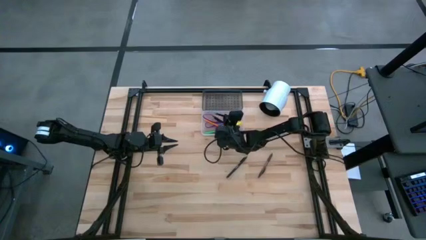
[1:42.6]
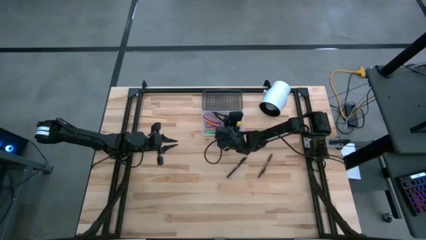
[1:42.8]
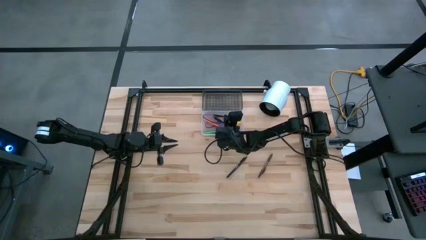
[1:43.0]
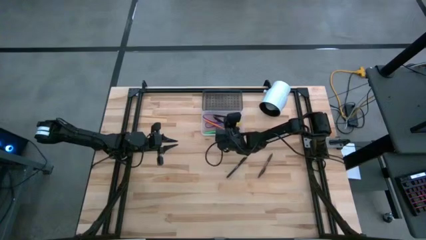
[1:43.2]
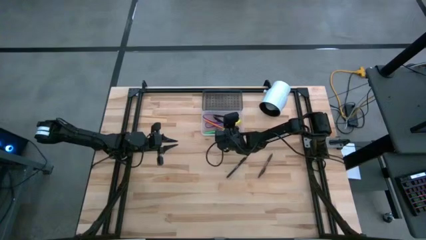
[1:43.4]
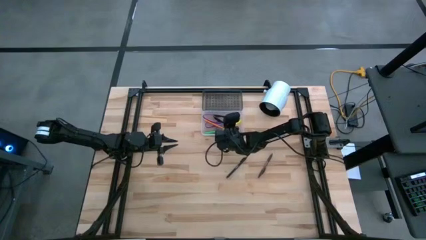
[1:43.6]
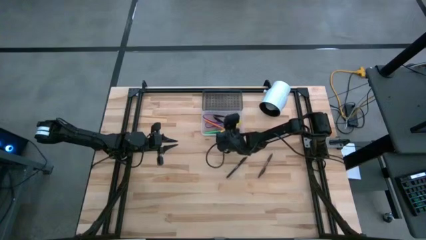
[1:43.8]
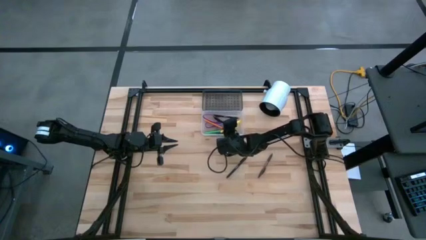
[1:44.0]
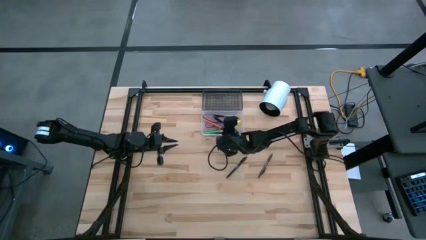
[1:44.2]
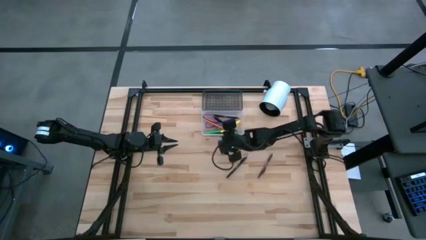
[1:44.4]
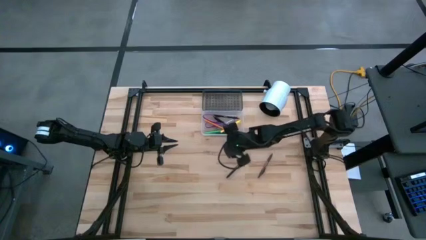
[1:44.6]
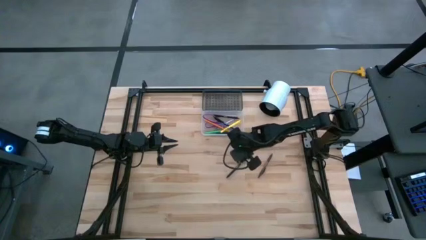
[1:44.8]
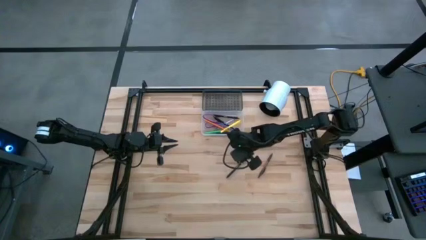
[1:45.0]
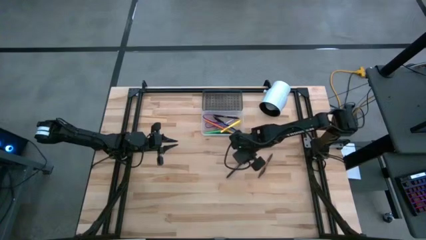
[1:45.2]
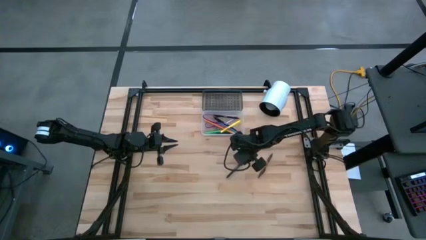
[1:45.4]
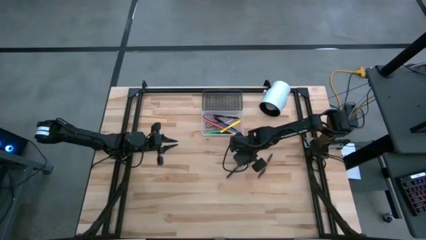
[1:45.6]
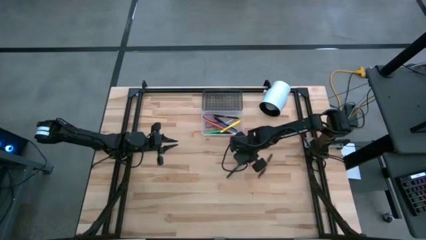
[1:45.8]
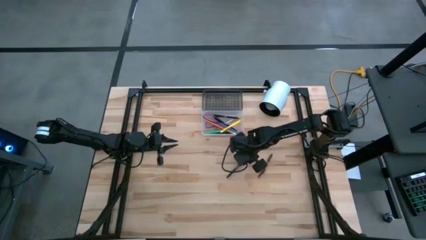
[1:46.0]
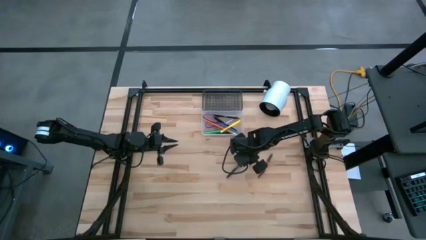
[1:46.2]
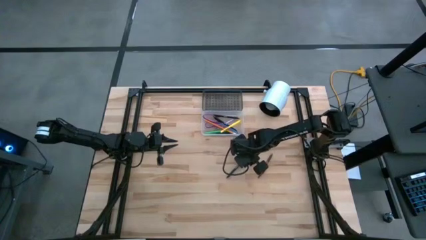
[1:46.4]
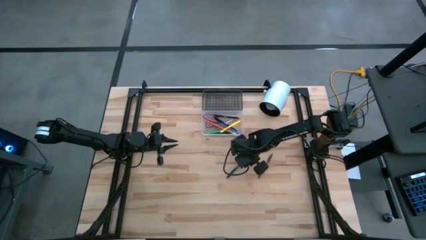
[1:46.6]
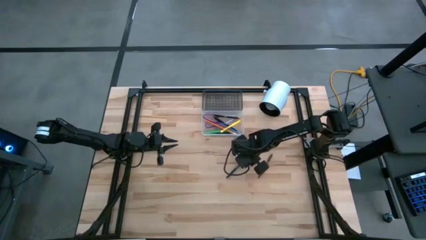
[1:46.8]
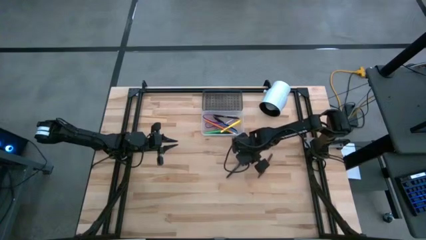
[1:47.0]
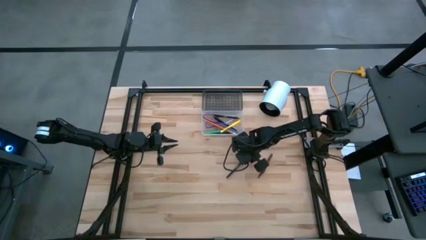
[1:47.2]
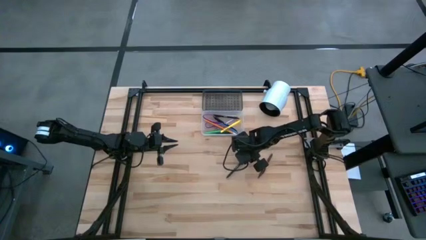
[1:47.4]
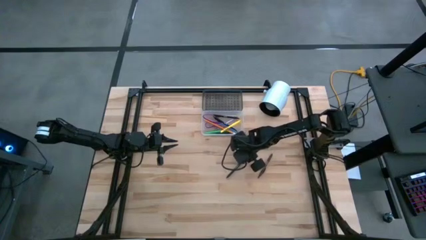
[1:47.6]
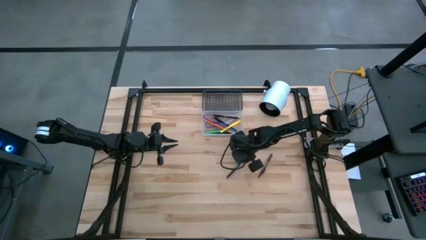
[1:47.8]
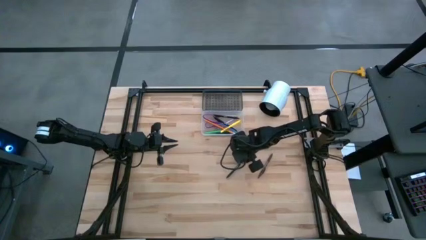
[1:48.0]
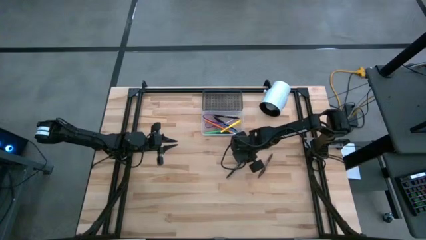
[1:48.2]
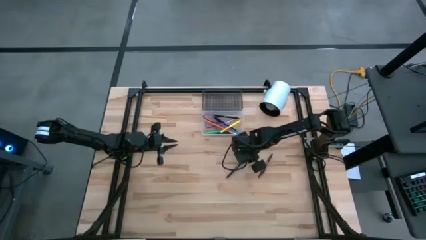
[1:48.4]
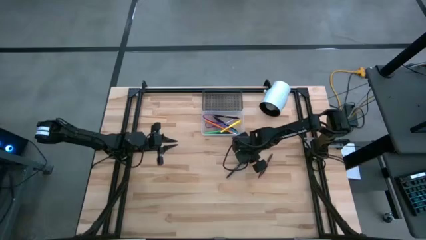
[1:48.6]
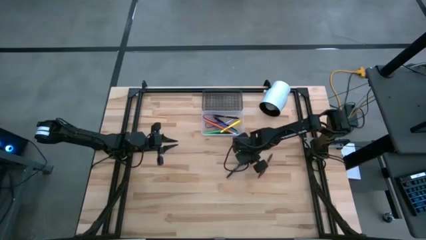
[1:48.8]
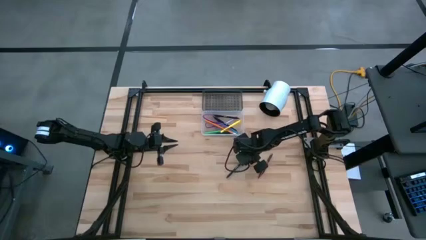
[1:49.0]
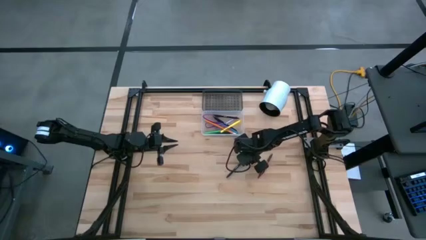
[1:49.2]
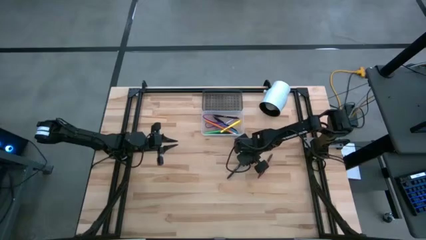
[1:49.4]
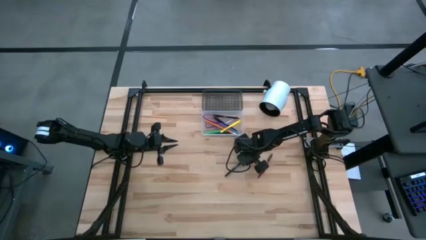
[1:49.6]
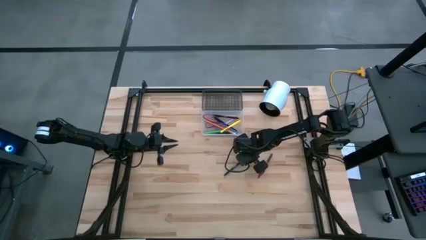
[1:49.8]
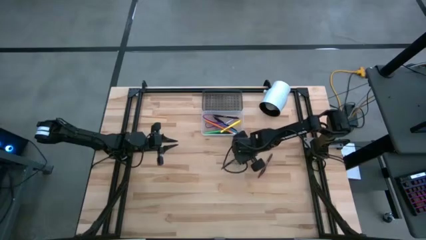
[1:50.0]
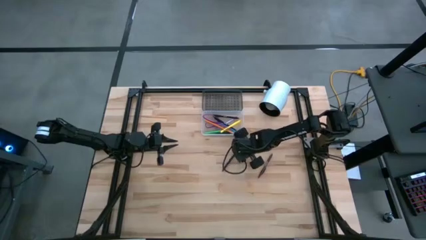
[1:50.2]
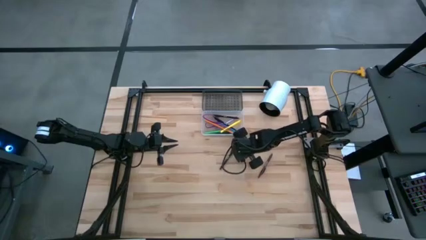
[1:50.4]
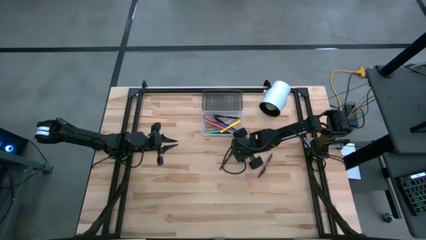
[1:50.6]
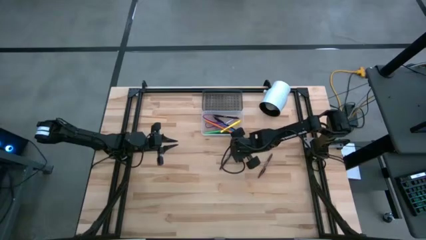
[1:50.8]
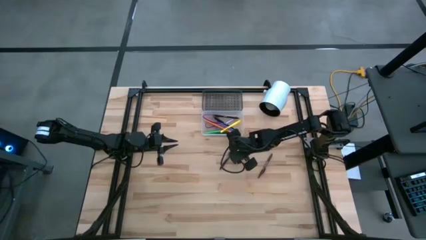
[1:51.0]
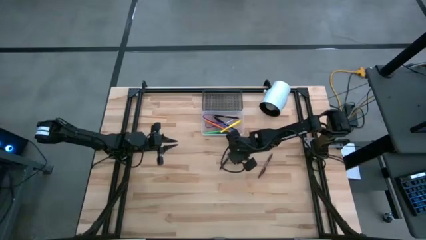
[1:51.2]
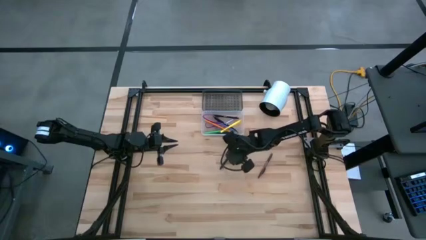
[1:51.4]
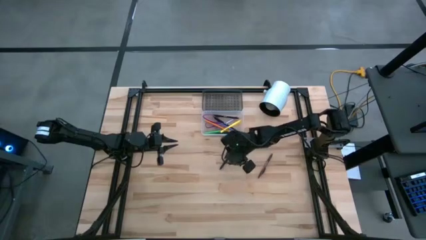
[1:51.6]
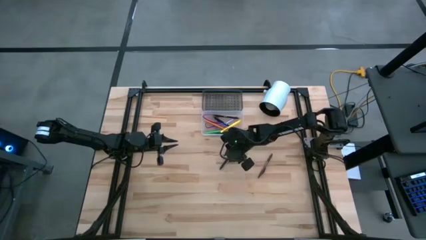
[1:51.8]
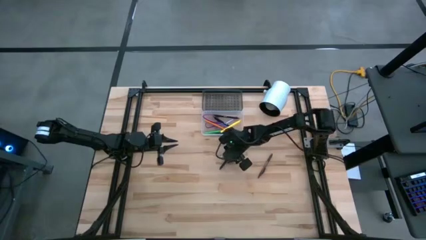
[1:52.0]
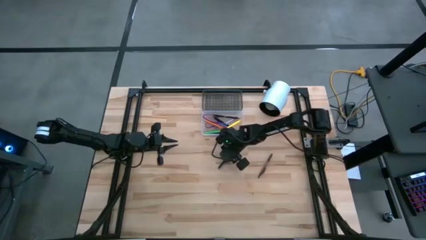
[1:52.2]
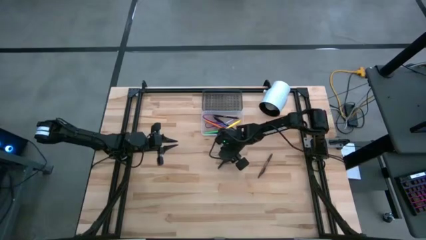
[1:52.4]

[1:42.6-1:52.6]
Task: Pick & place school supplies into a supply box
Put the black pen into the black box

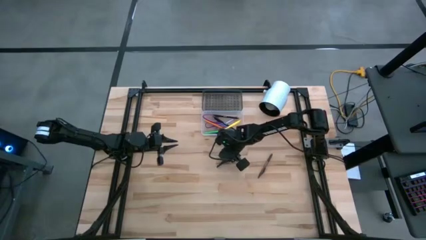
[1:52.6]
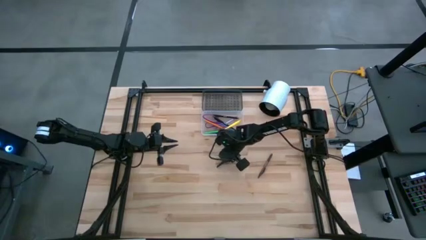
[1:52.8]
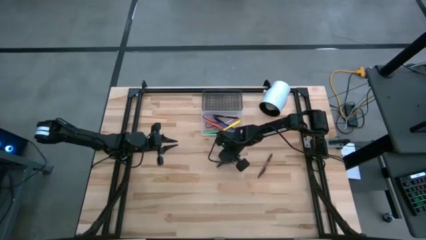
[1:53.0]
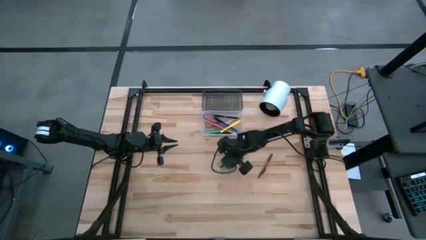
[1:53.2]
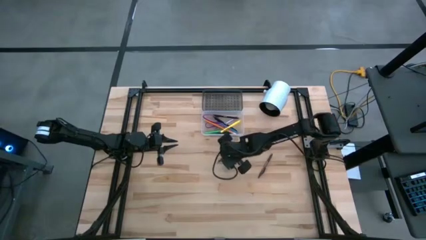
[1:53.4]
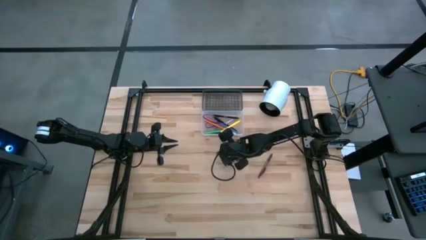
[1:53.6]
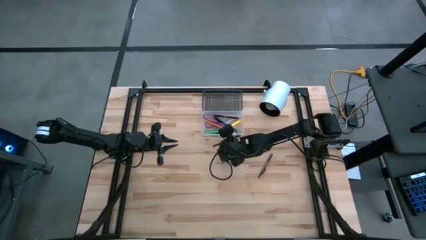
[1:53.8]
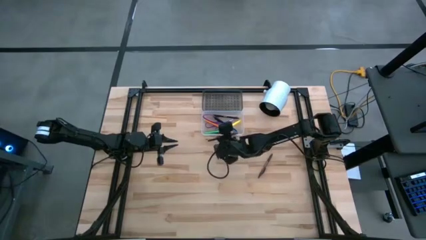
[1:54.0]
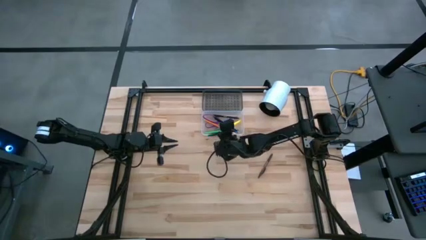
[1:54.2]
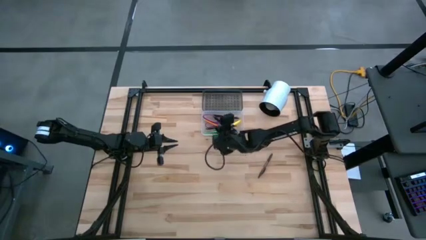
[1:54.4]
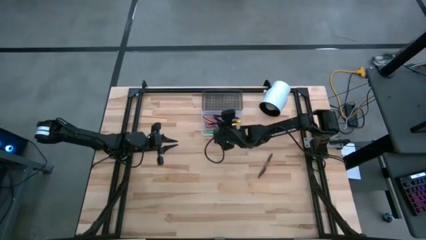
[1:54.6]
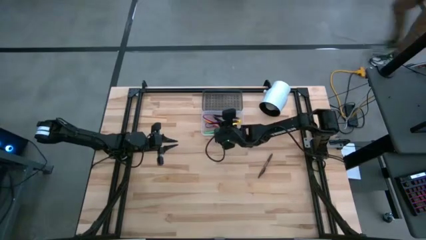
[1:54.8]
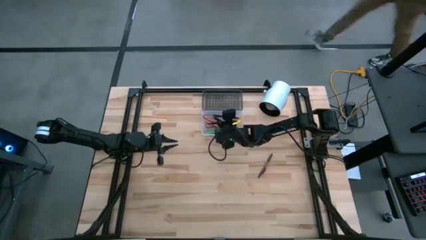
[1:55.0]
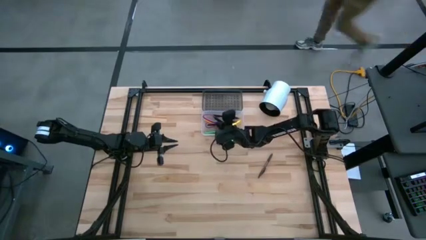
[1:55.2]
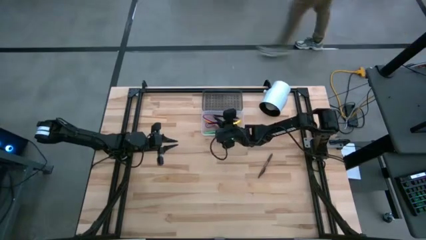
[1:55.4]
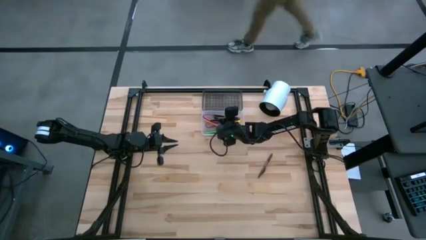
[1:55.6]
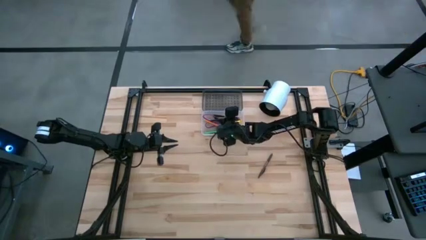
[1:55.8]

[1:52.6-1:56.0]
Put the black pen into the black box

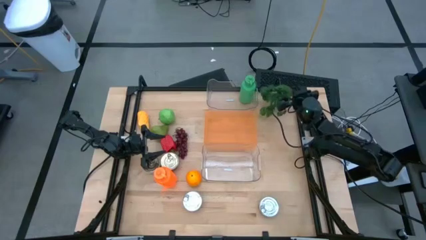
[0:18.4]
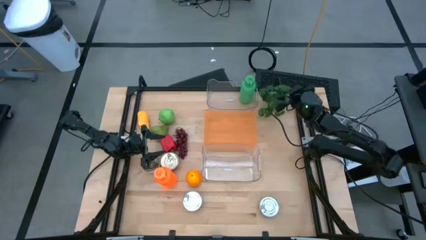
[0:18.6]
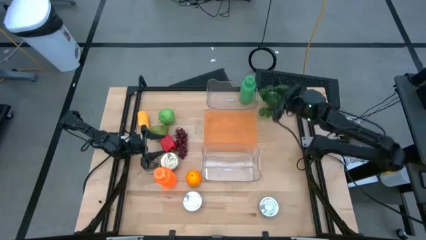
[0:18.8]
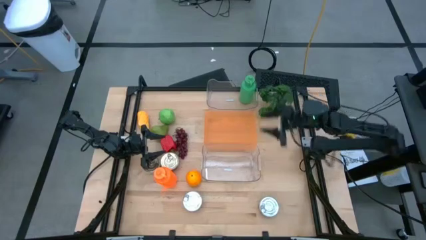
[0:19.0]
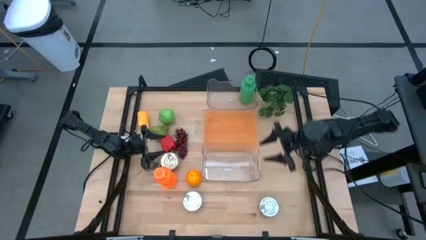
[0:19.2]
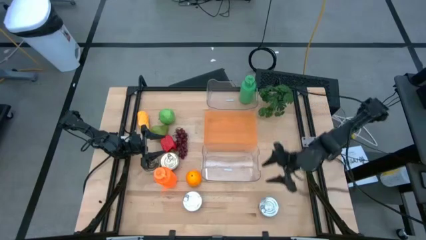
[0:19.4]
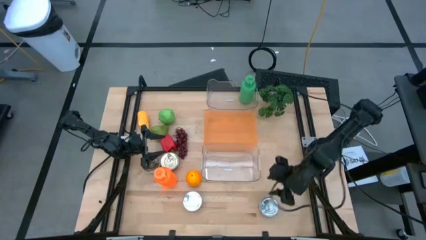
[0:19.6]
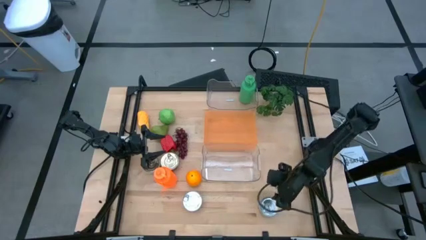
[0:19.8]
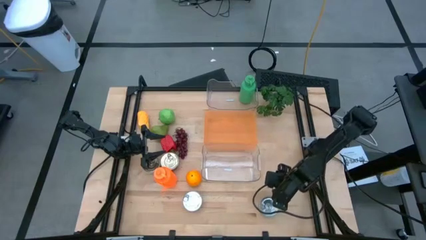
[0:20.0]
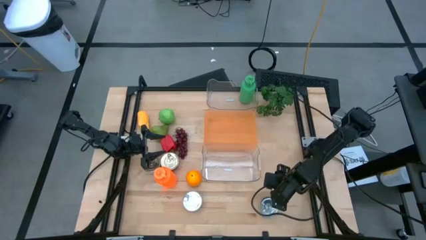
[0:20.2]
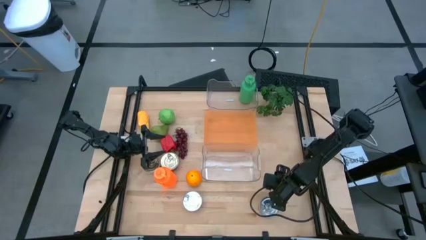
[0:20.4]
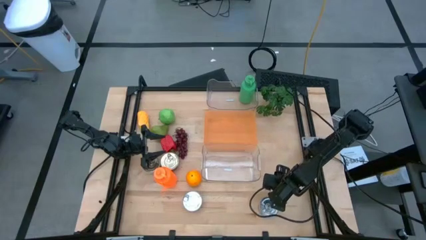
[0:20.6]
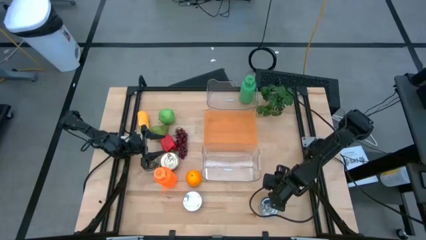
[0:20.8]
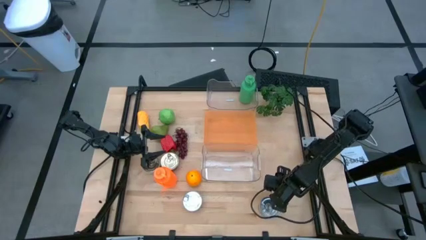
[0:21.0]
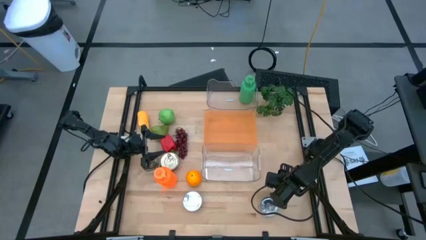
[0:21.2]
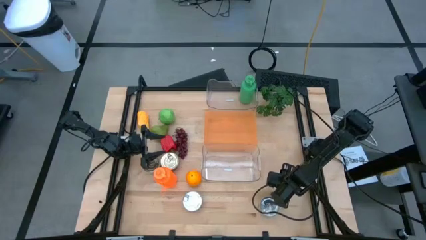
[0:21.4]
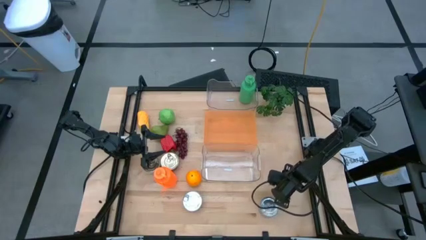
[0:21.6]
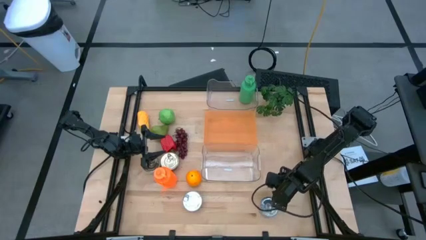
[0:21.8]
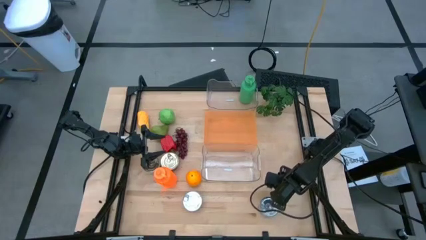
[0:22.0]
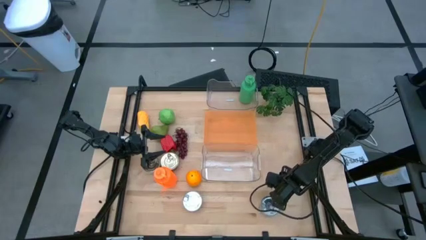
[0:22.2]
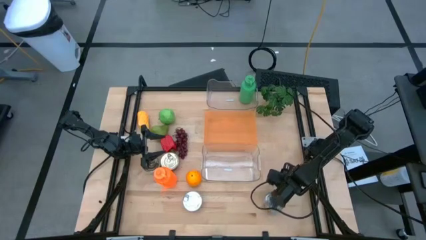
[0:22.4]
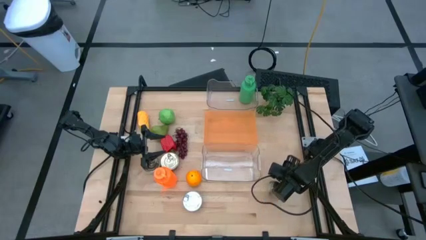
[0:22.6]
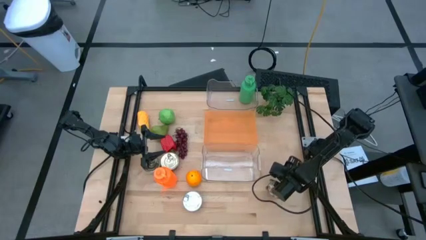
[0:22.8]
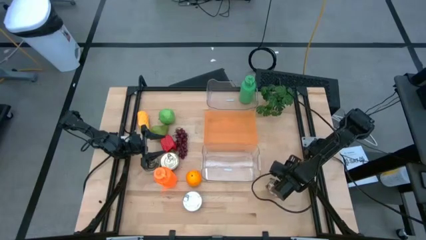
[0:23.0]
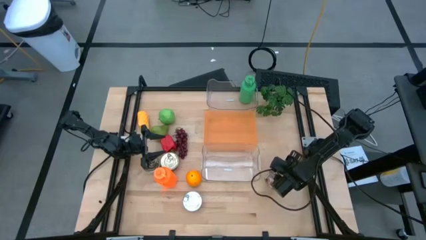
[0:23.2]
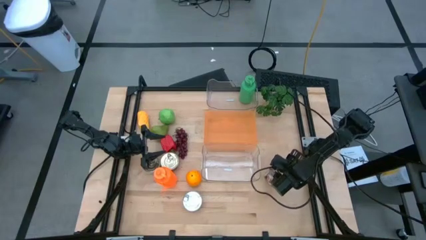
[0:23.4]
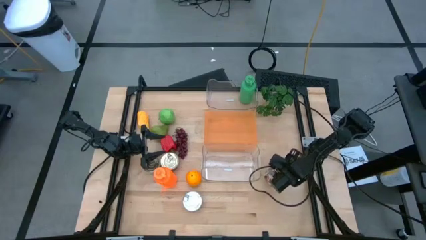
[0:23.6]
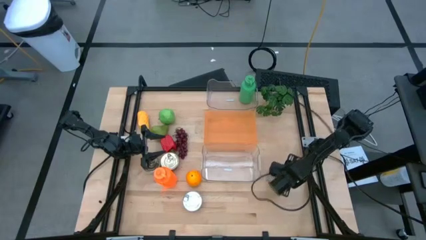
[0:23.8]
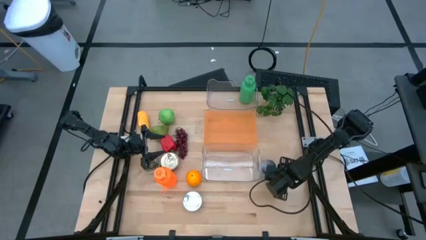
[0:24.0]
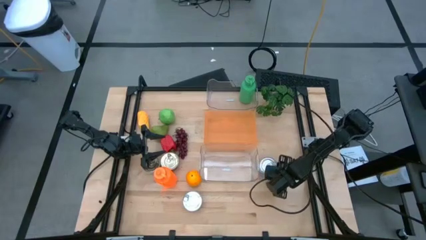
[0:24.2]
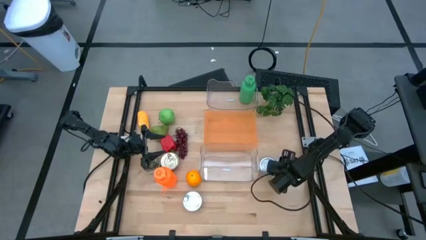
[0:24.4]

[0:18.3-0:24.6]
Task: Pick & Place Food Item
Put the right green tuna can into the orange bin
